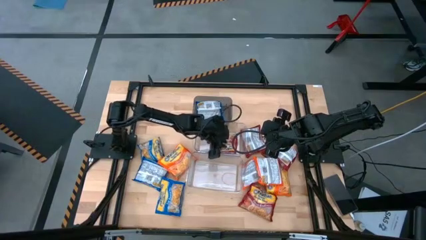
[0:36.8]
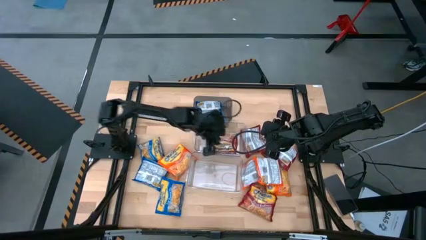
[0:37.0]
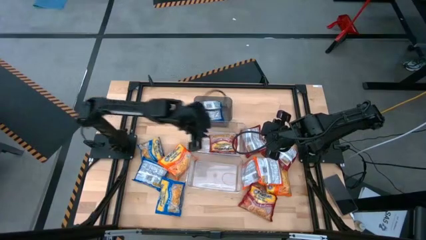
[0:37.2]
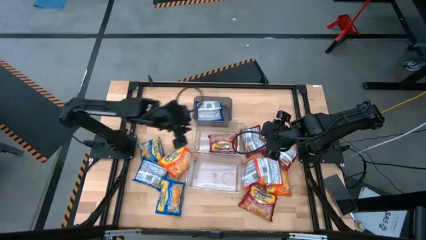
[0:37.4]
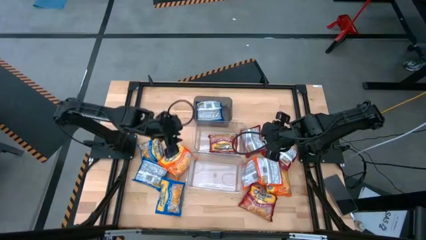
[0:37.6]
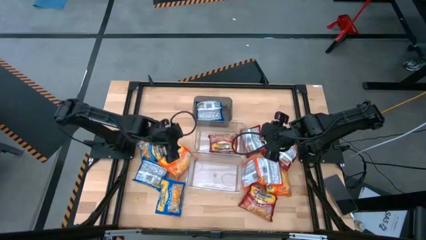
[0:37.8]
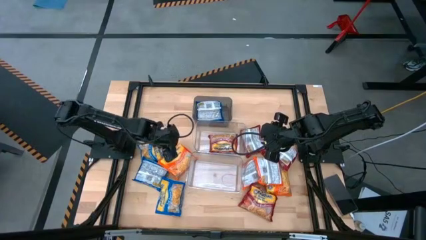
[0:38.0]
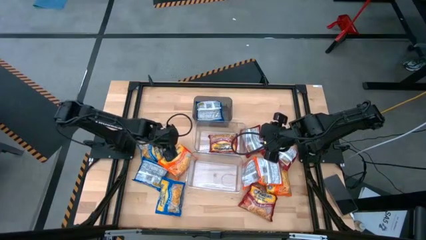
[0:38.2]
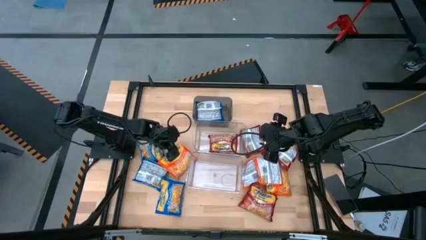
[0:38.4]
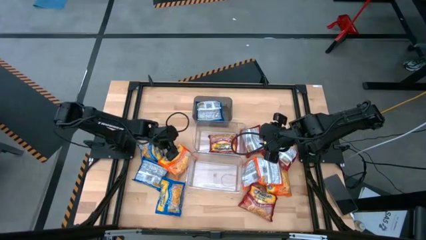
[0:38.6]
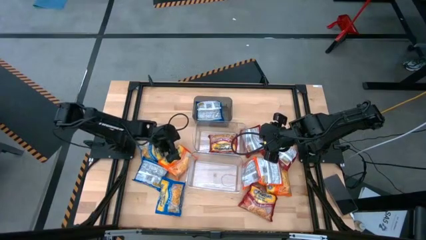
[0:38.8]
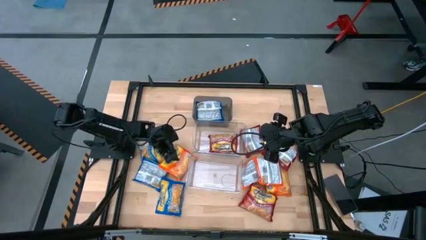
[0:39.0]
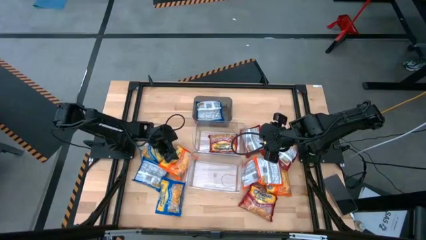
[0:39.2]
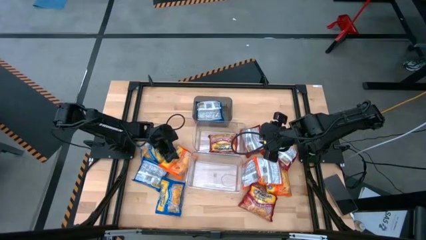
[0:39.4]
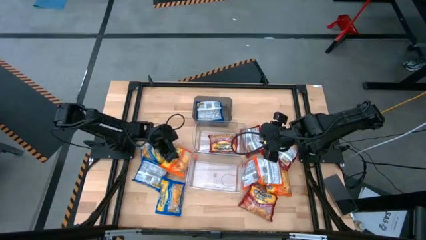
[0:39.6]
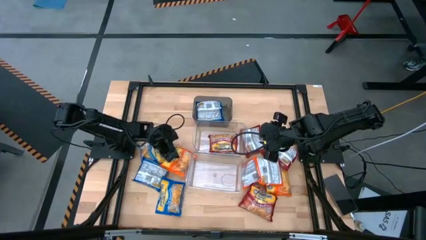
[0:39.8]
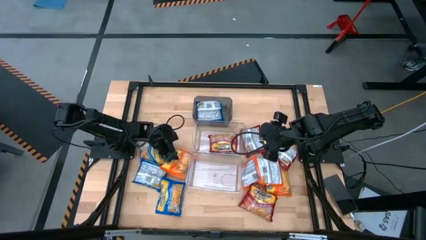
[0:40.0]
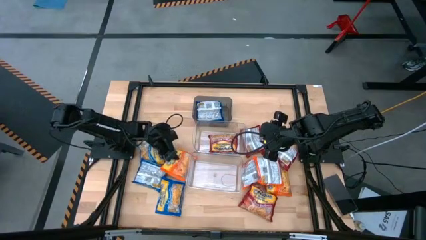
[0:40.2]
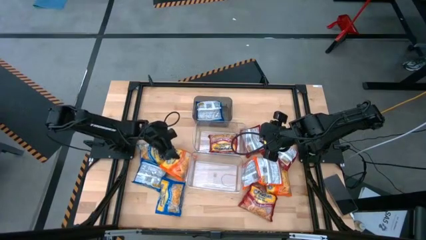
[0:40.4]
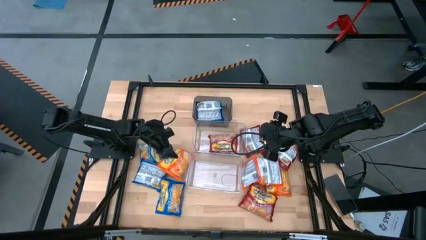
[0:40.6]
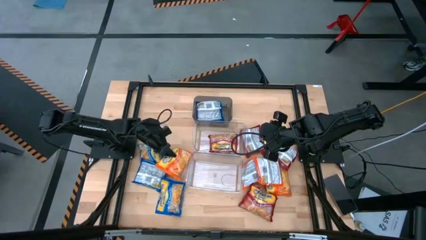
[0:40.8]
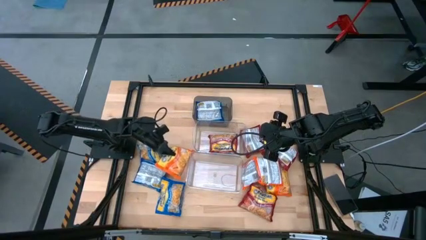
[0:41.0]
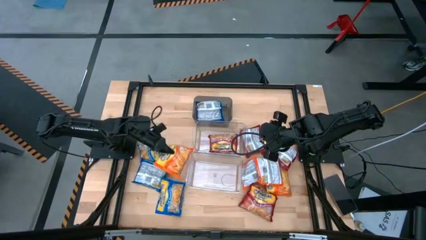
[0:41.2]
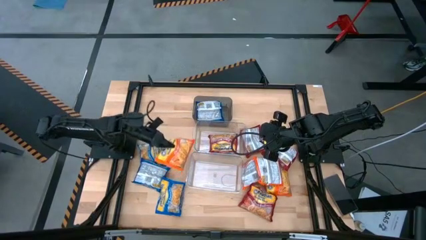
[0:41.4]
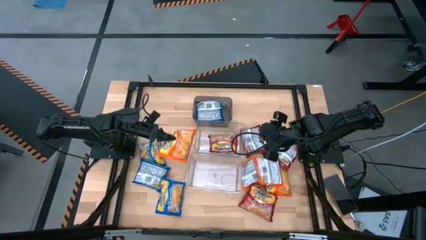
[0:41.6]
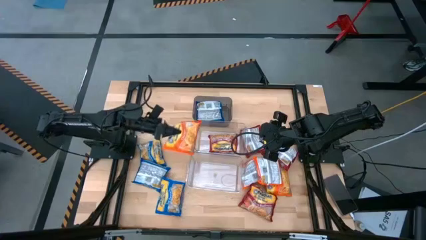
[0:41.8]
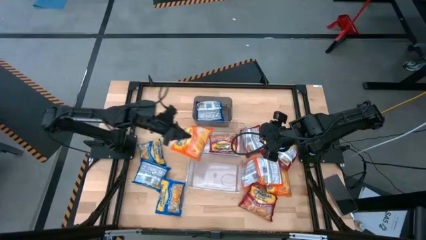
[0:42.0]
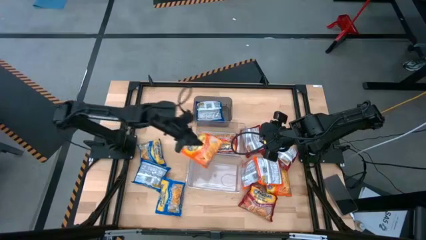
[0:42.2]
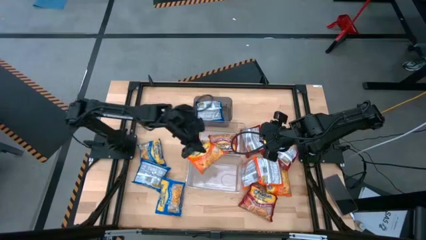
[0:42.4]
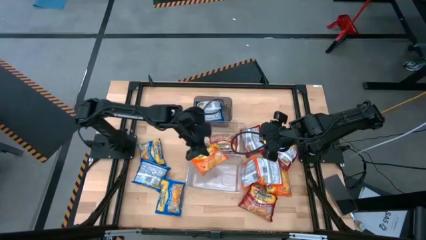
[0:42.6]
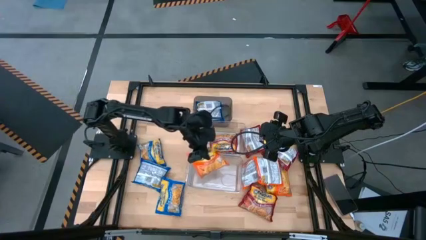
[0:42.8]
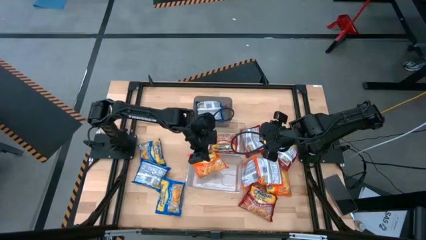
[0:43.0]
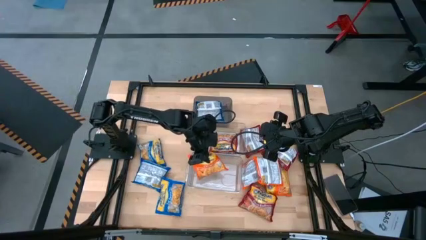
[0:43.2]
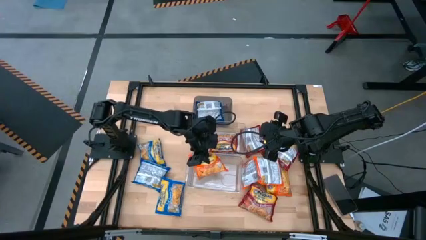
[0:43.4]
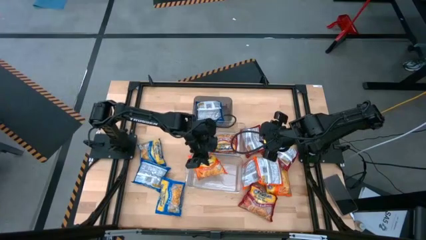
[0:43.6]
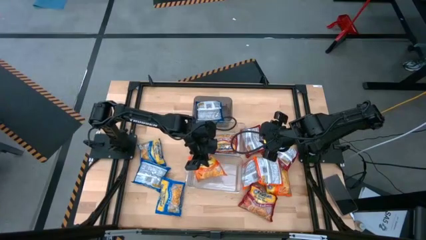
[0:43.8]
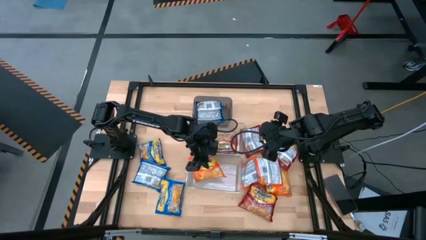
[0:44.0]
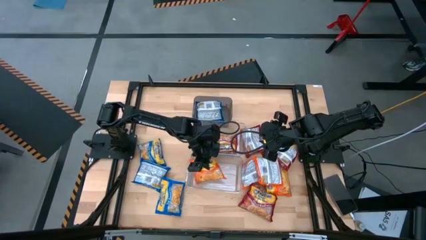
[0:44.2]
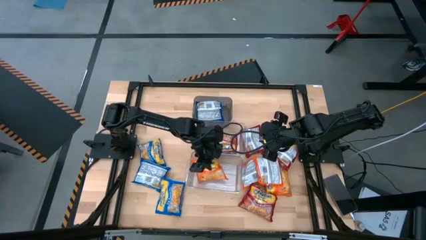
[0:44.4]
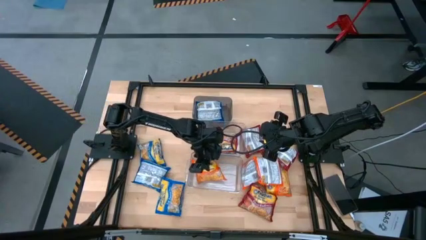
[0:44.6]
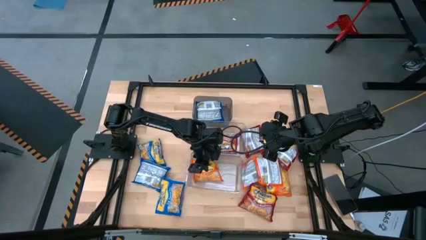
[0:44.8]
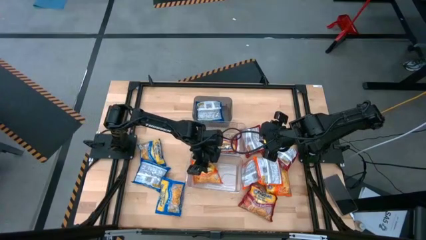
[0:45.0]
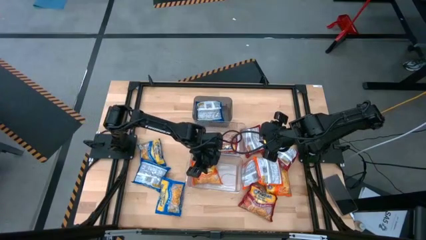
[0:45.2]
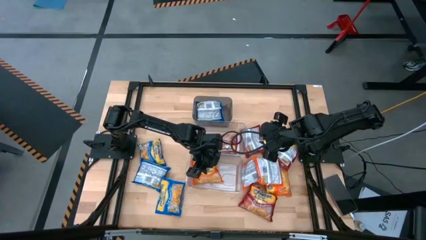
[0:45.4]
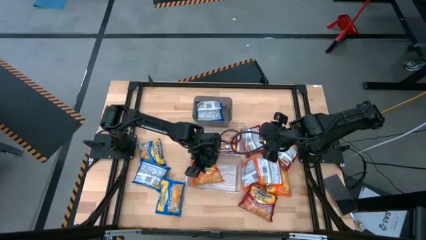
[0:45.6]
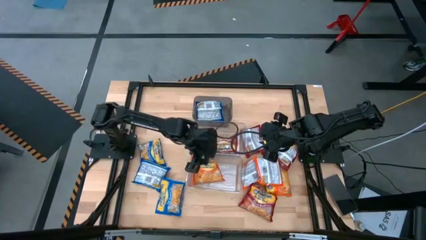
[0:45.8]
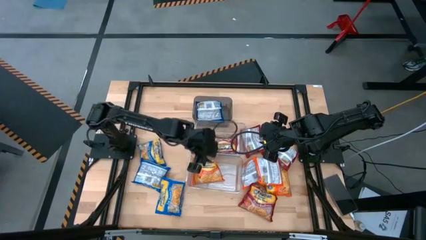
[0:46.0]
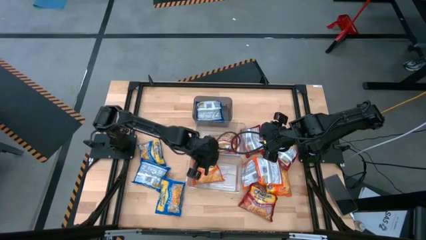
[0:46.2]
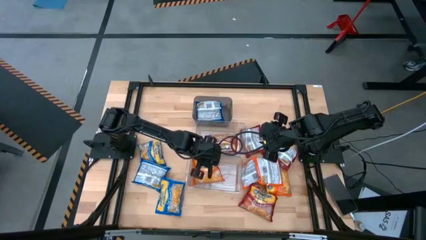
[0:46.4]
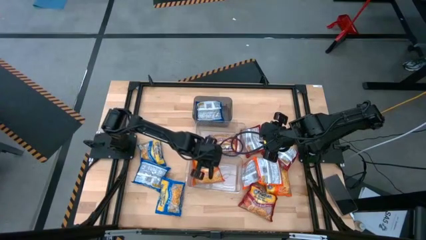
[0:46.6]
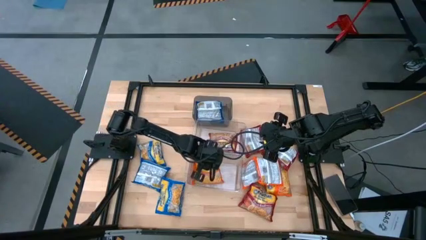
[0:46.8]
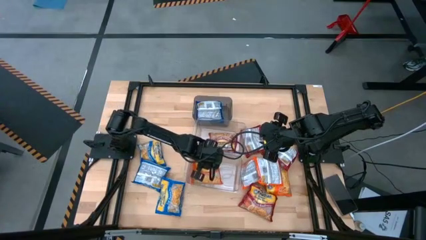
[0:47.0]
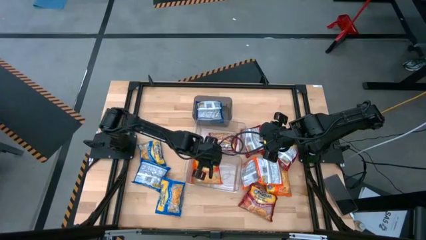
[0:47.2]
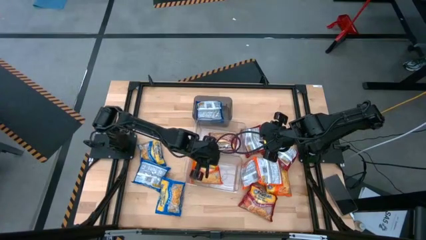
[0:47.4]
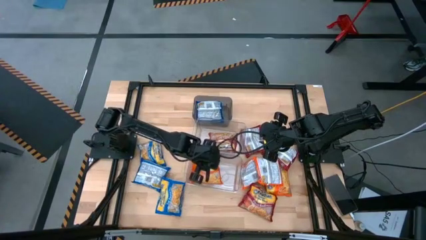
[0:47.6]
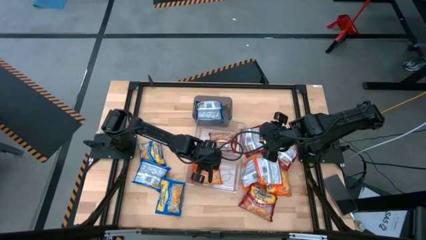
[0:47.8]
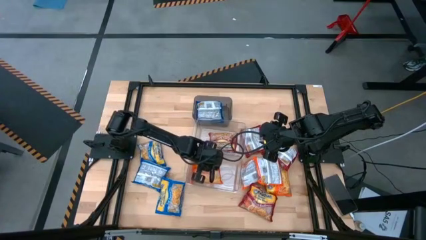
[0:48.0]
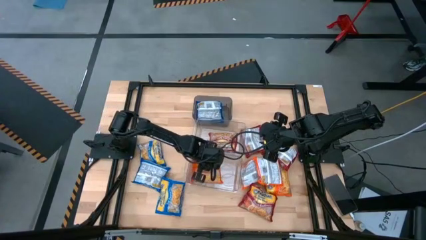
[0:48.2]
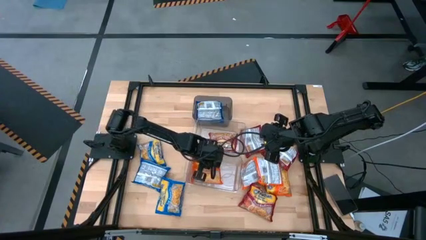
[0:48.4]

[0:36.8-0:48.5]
Task: Sort Maruchan noodles
Put the orange noodle pack into the bottom transparent bin
